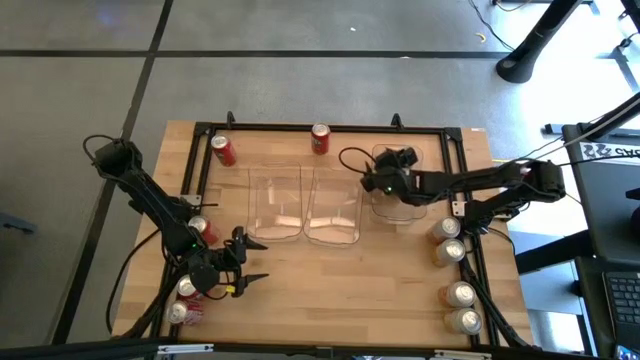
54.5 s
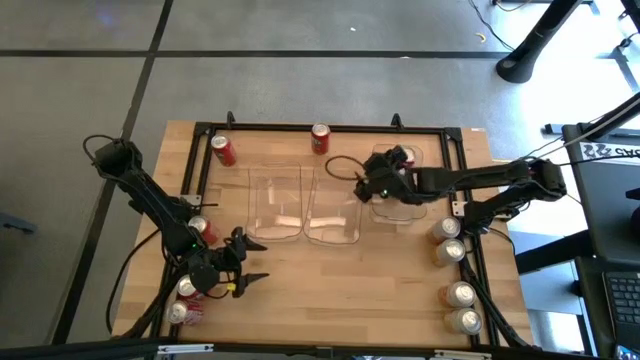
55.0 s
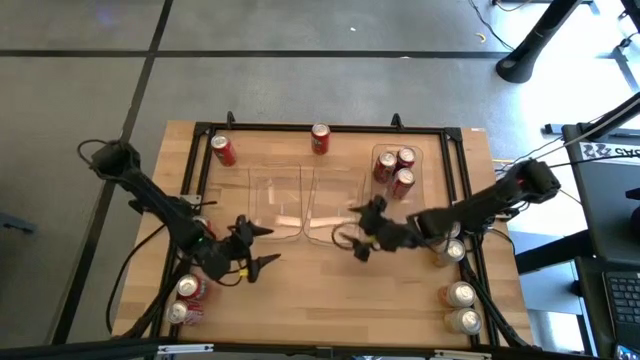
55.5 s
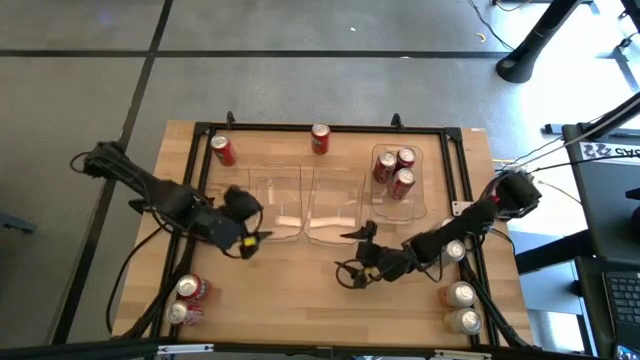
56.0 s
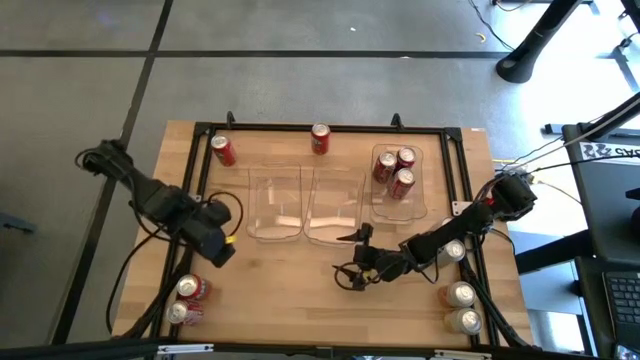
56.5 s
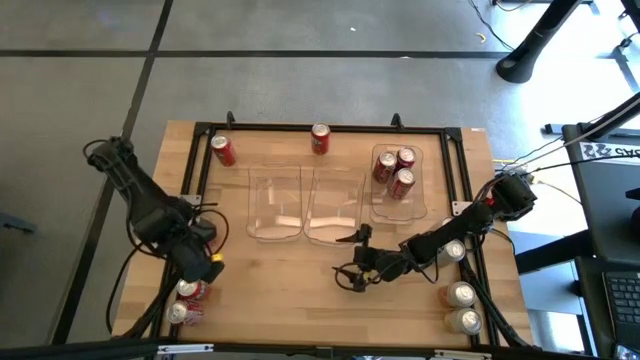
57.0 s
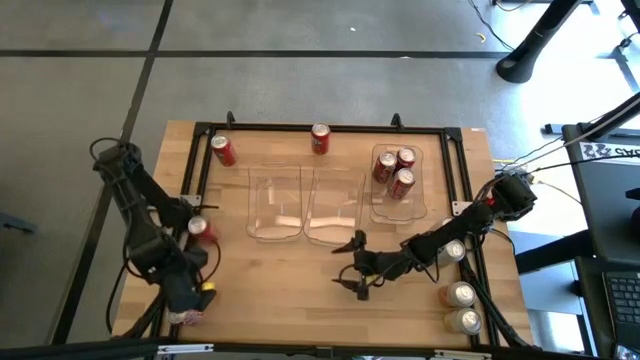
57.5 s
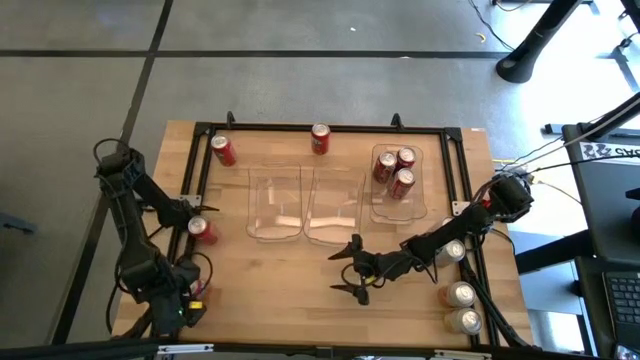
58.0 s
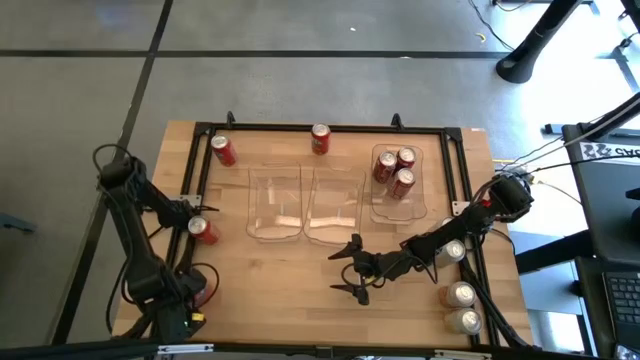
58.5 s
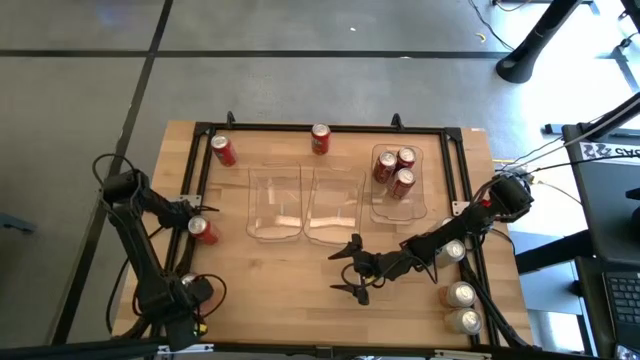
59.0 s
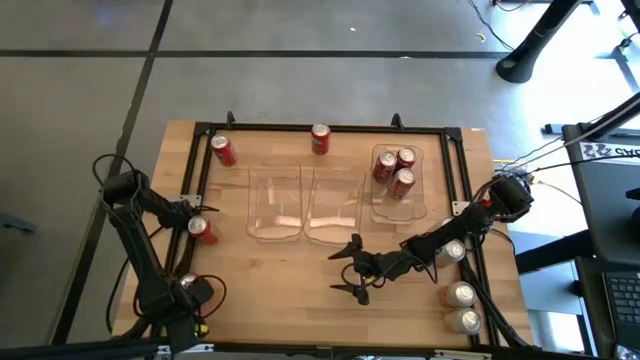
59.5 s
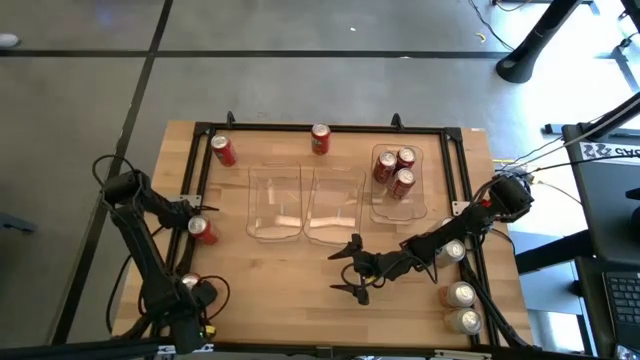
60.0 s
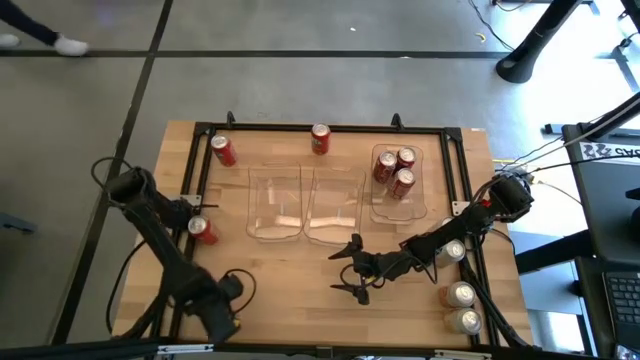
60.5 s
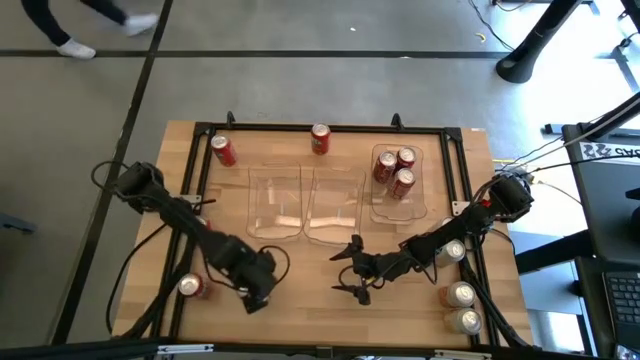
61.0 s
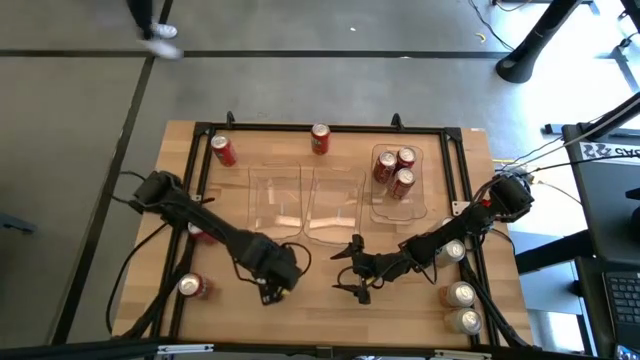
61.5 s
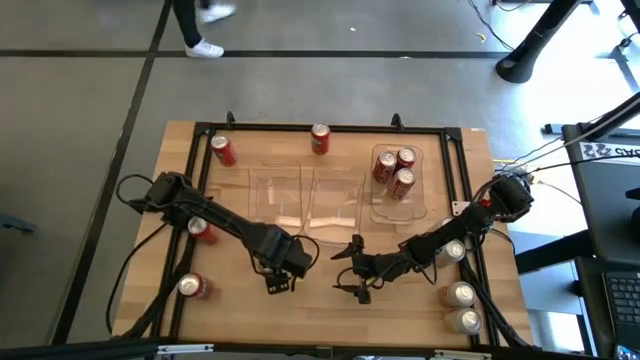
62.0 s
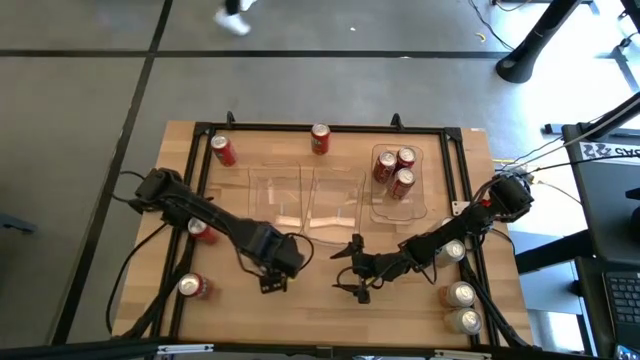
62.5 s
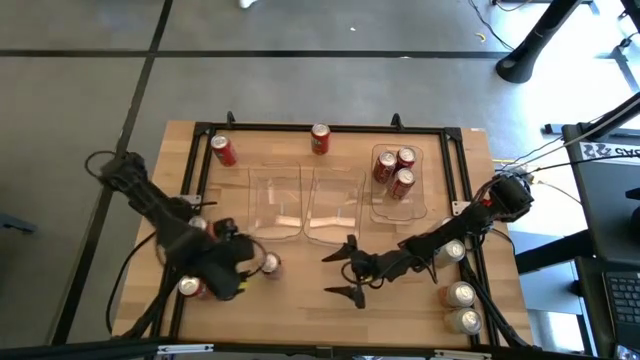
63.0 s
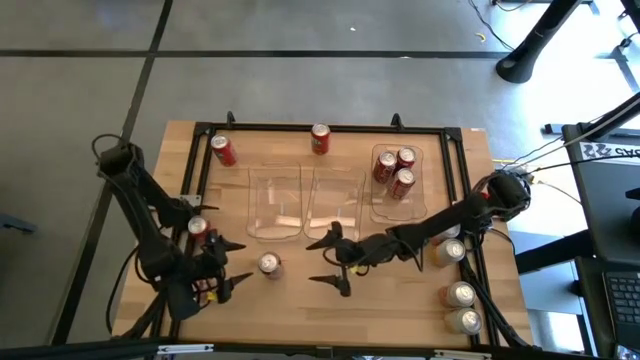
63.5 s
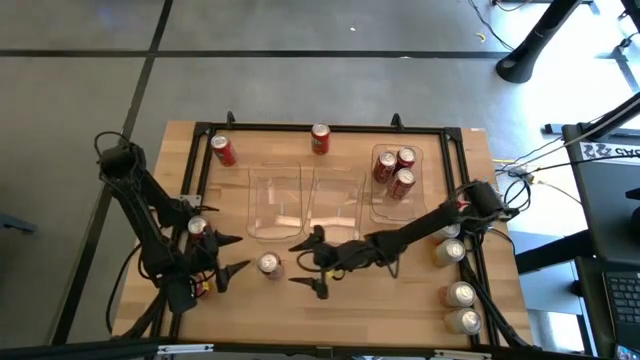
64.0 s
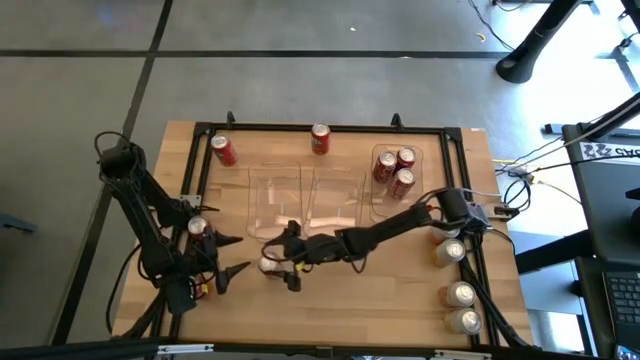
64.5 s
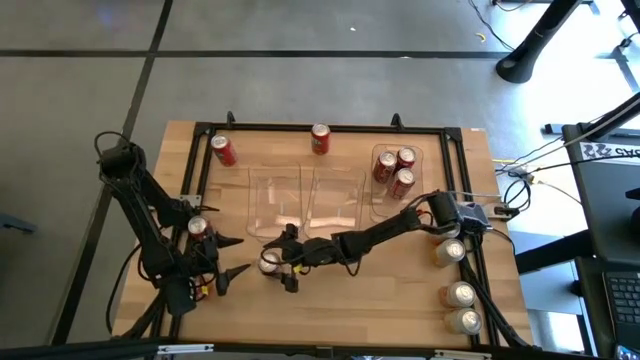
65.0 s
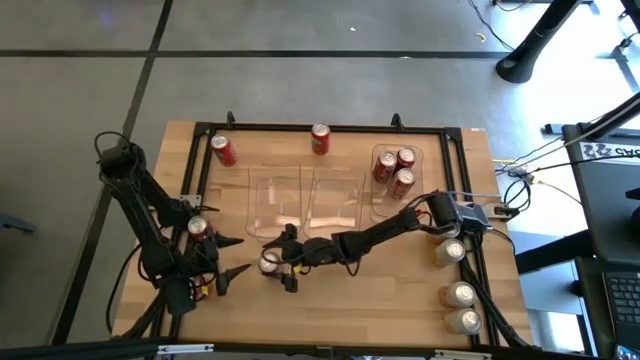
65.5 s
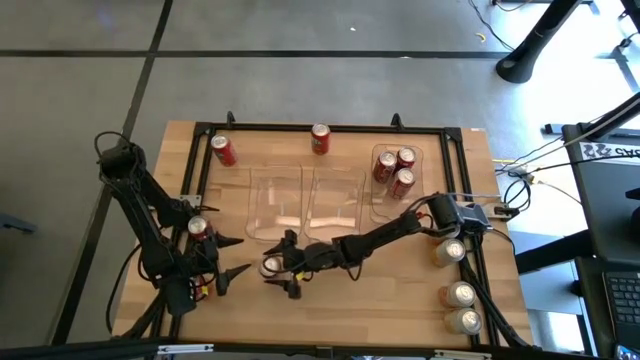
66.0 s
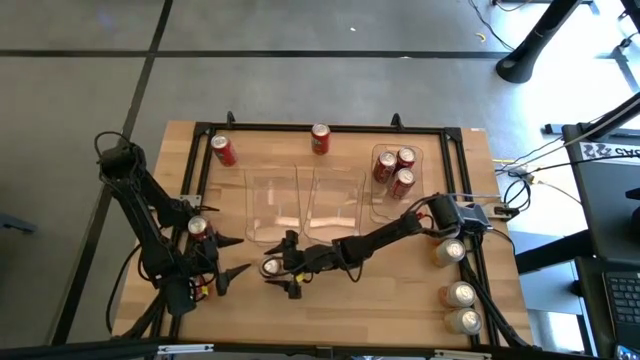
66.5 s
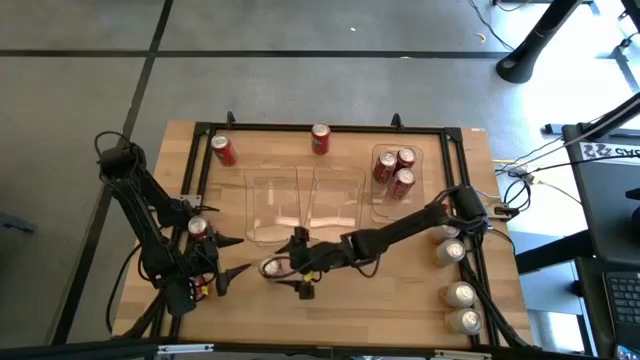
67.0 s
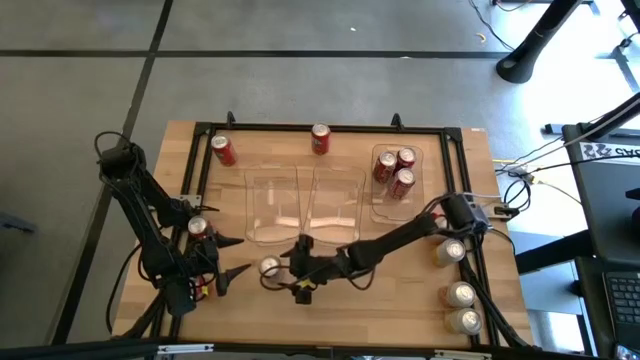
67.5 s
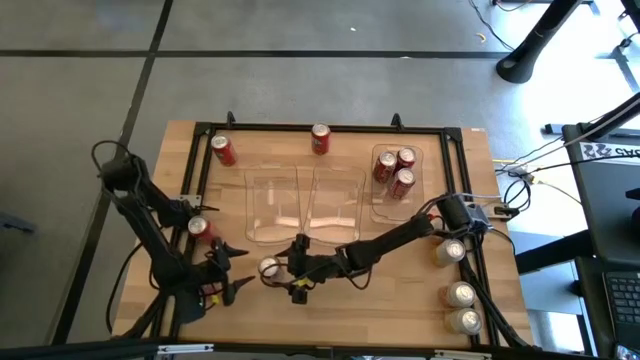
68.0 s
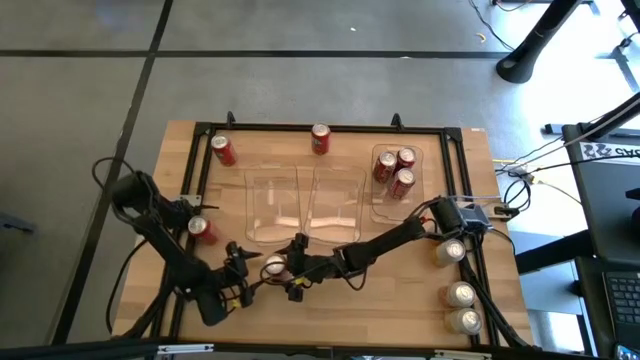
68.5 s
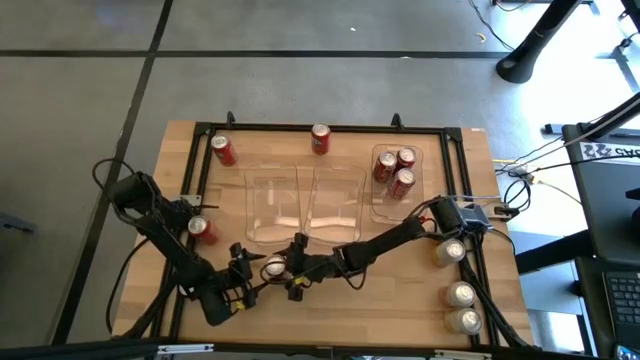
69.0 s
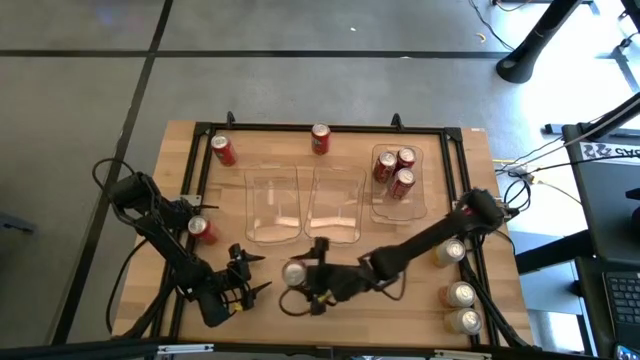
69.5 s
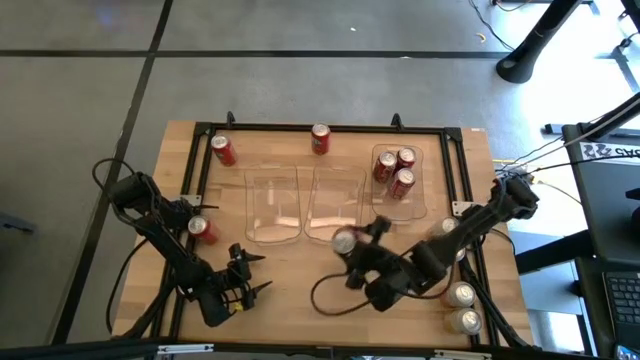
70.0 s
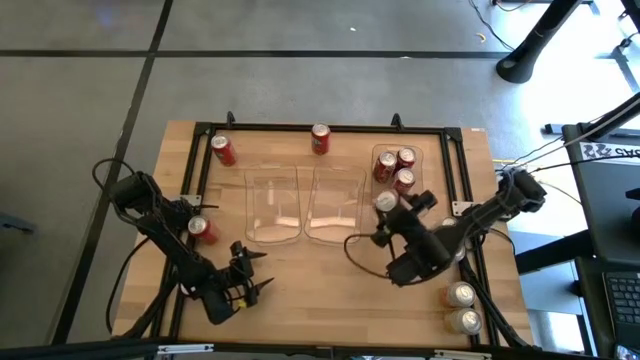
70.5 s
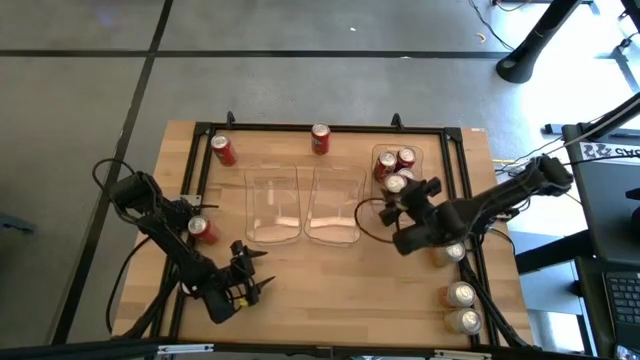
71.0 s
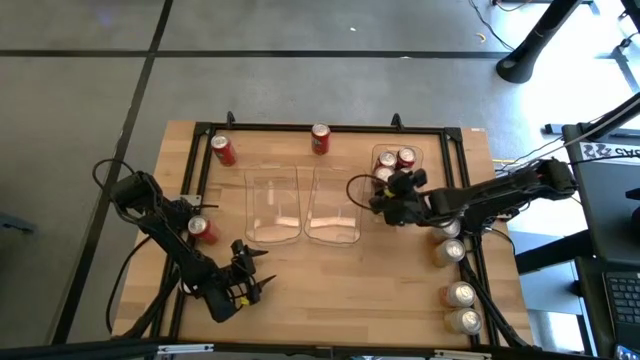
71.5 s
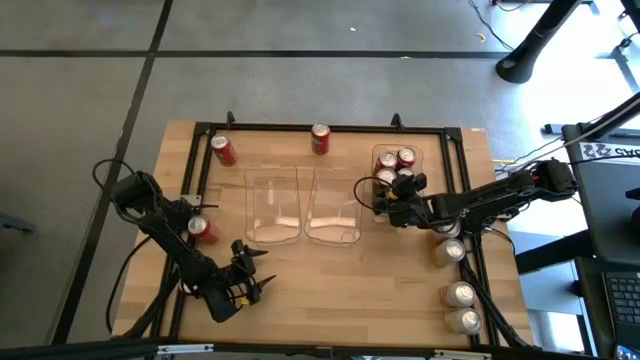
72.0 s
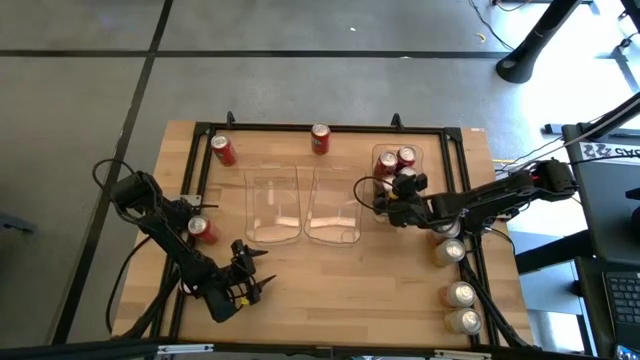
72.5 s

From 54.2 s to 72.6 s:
Task: Sort soda cans
Put the red soda can into the right transparent bin

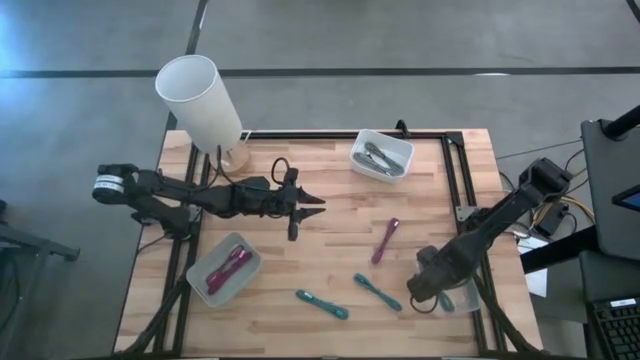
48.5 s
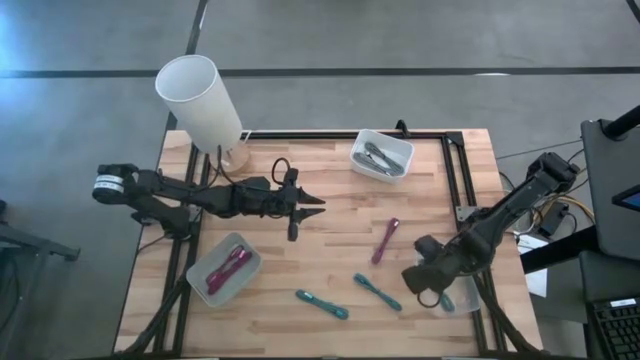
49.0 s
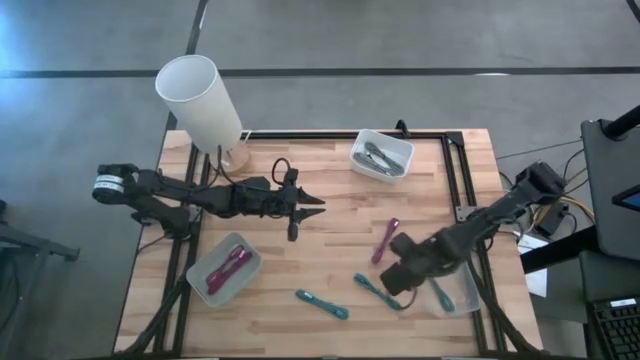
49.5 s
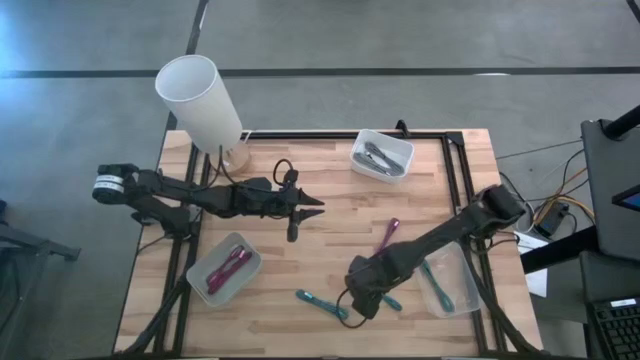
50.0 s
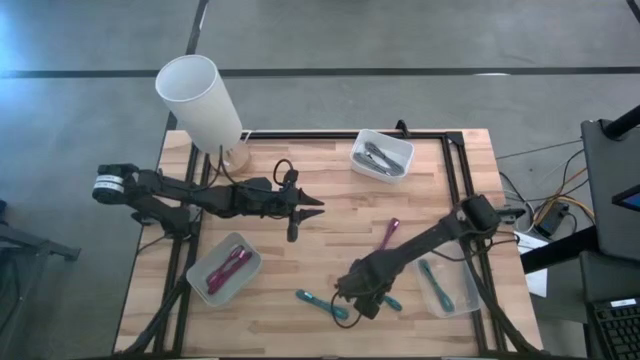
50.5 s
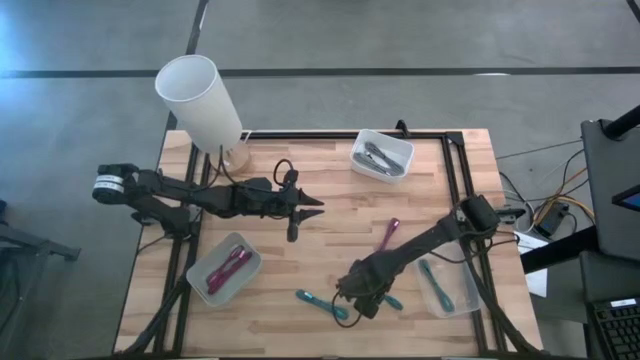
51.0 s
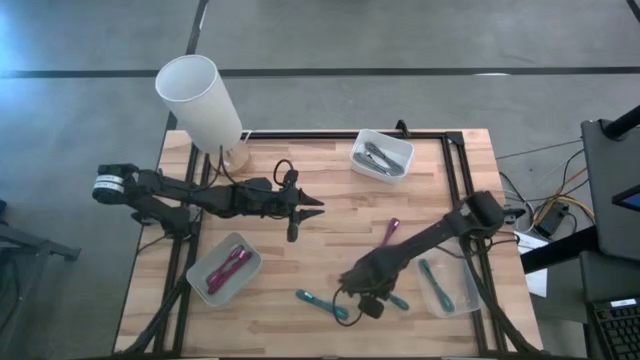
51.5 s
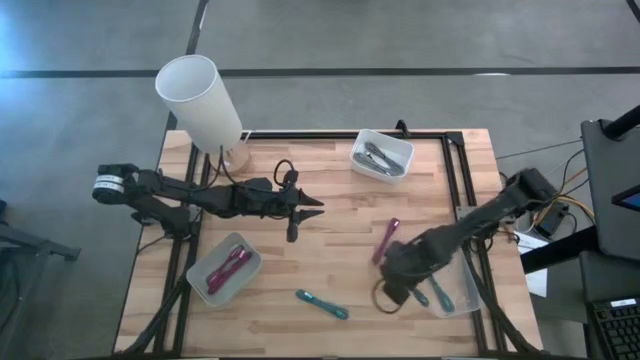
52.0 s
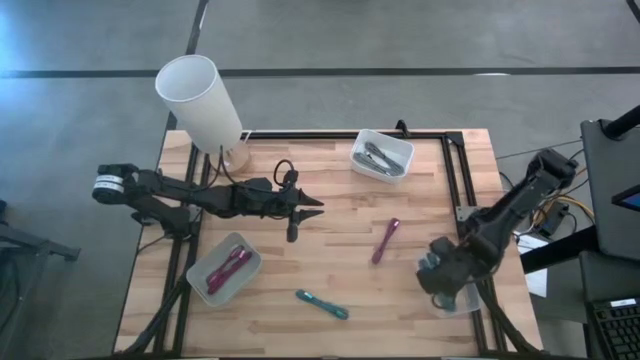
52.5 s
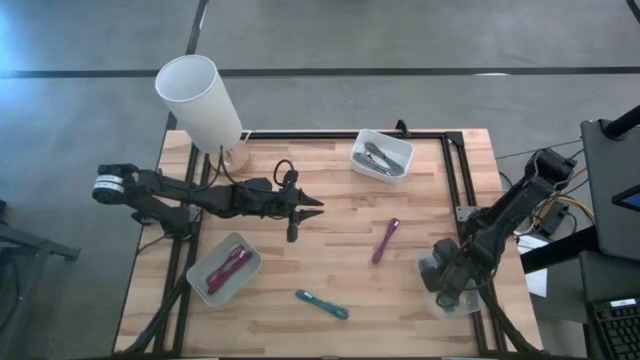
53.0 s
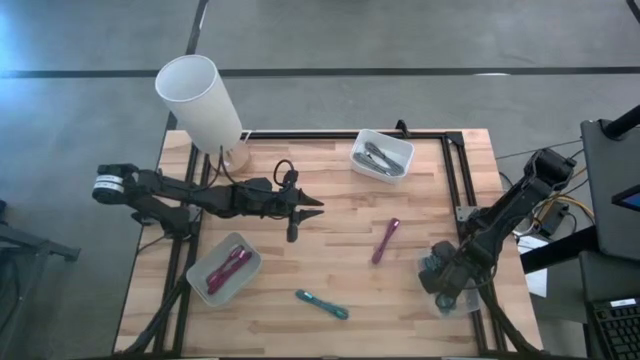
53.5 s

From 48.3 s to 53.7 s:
Task: Pick & Place USB Port
Put the right blue patterned charger cable into the transparent bin
